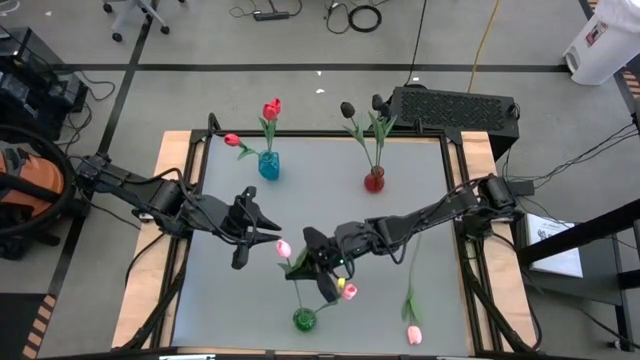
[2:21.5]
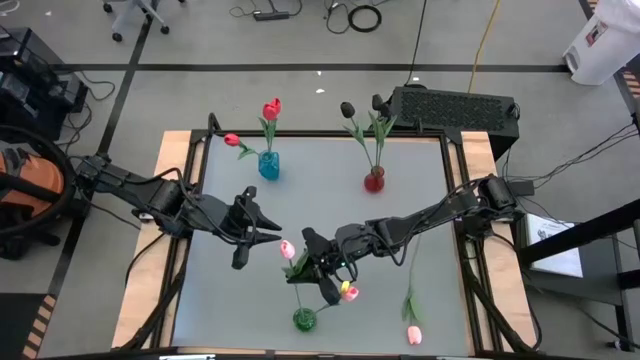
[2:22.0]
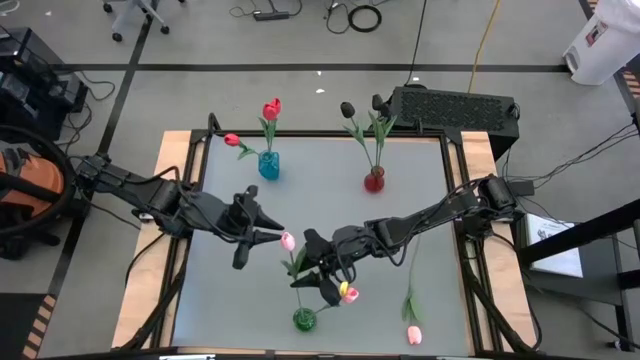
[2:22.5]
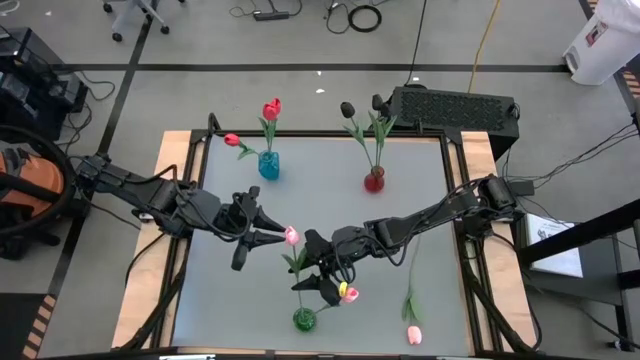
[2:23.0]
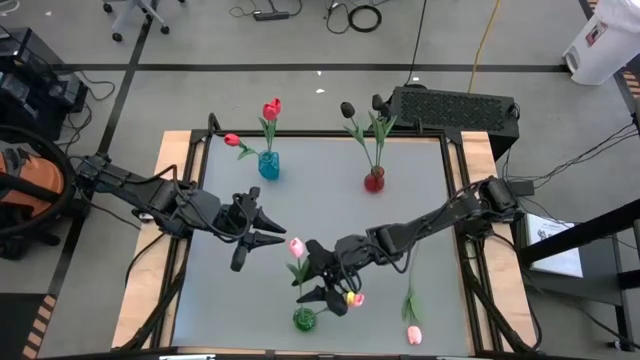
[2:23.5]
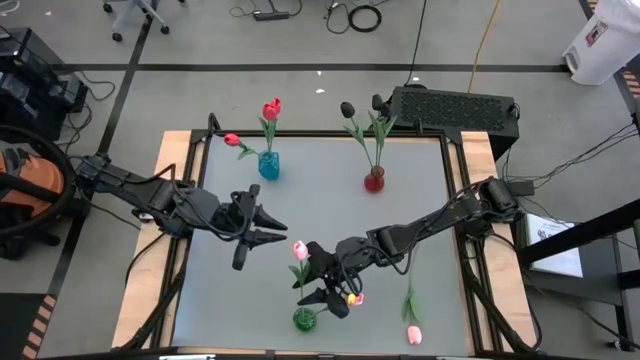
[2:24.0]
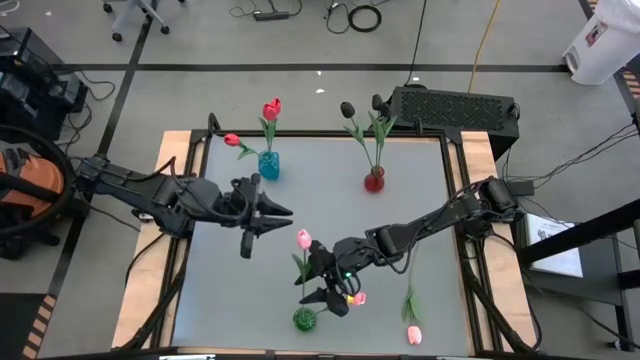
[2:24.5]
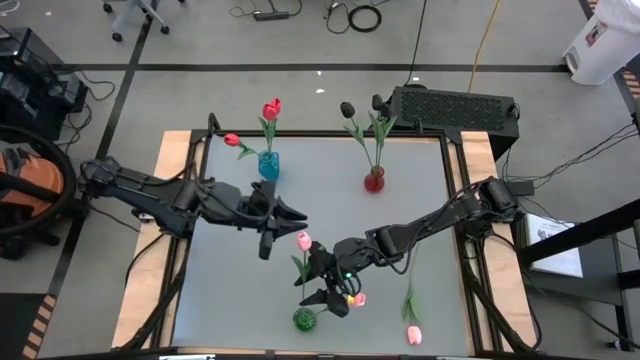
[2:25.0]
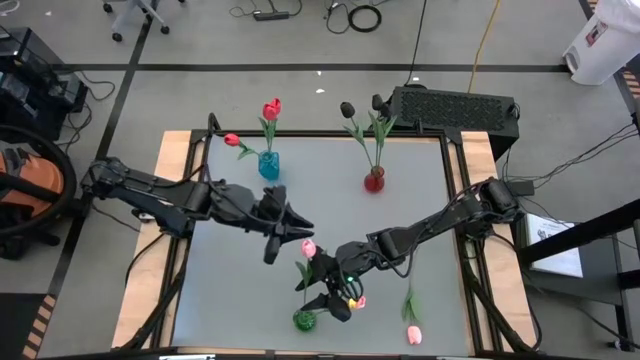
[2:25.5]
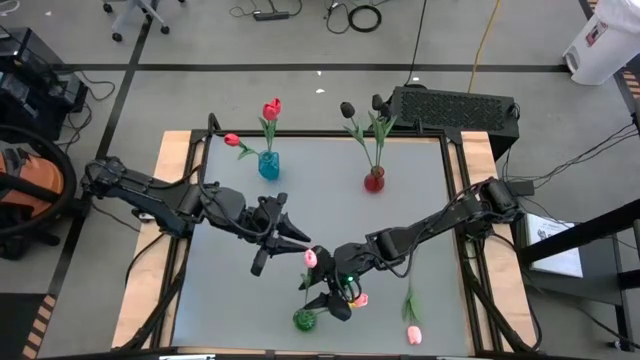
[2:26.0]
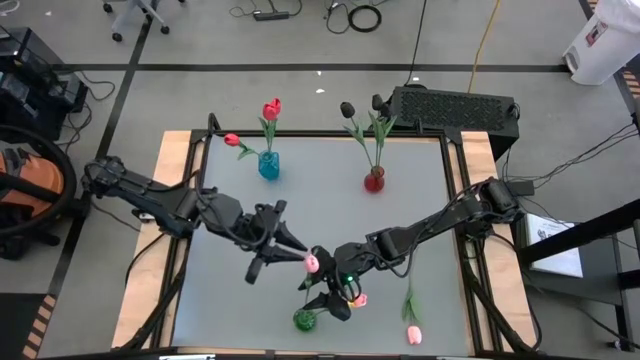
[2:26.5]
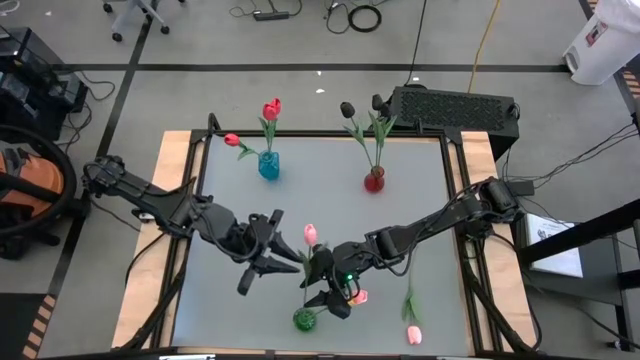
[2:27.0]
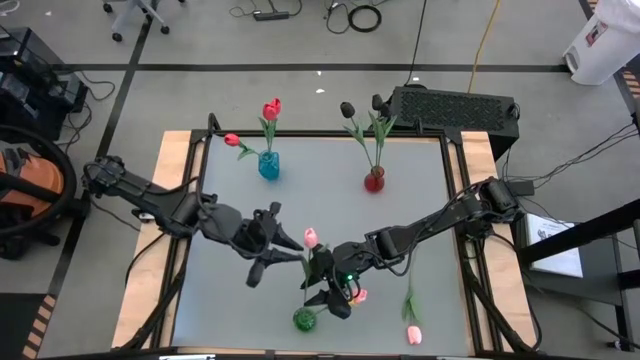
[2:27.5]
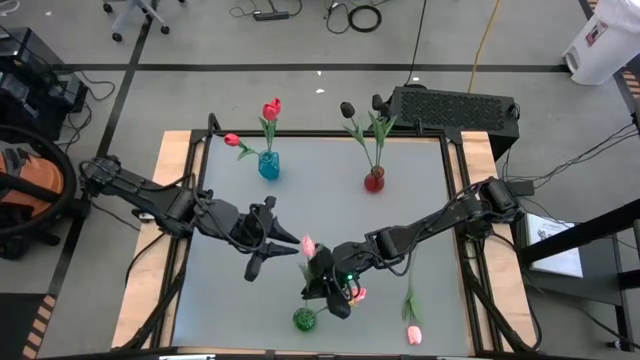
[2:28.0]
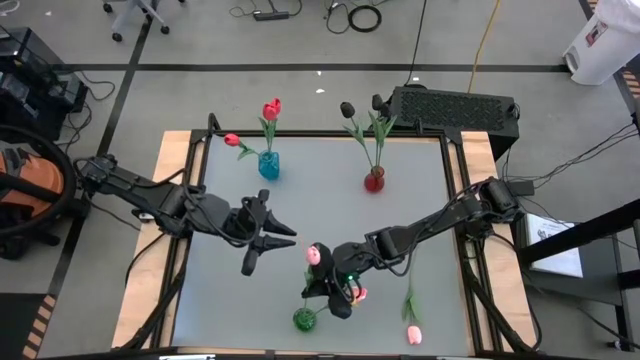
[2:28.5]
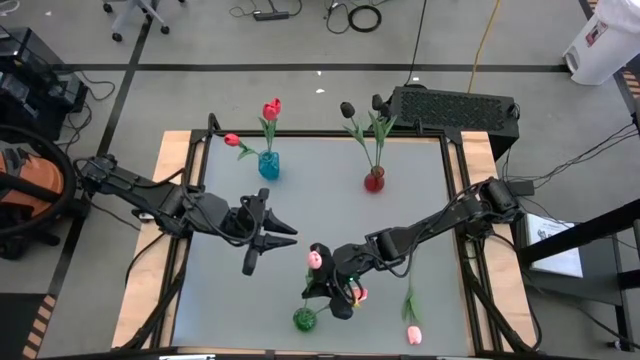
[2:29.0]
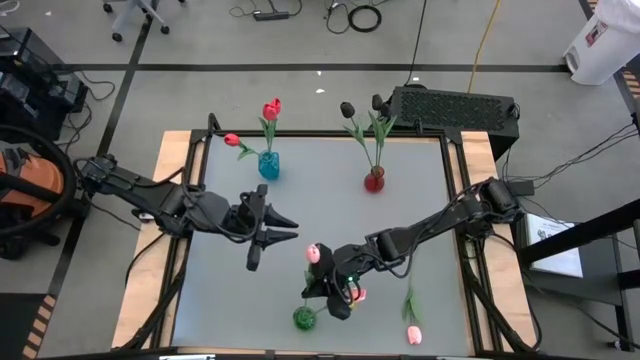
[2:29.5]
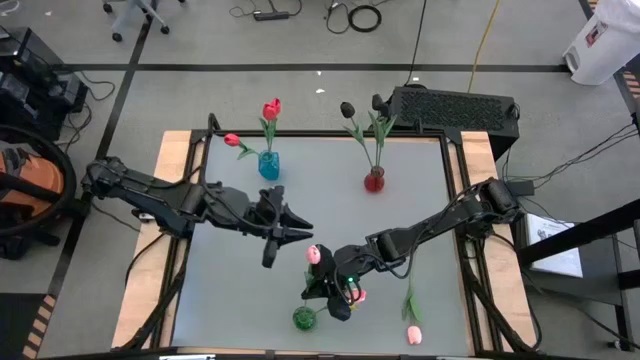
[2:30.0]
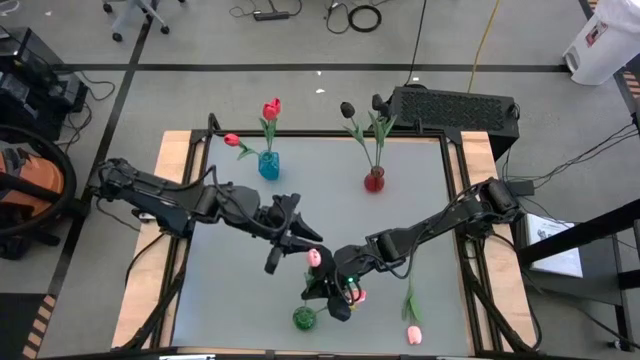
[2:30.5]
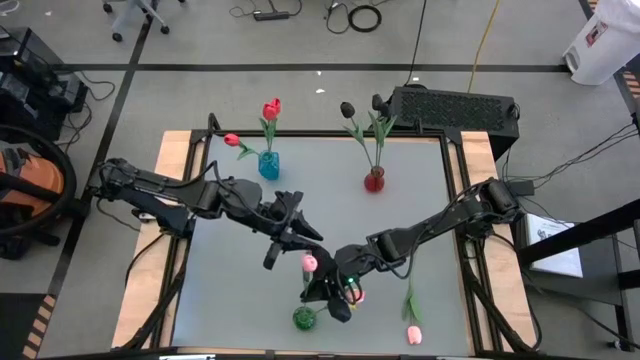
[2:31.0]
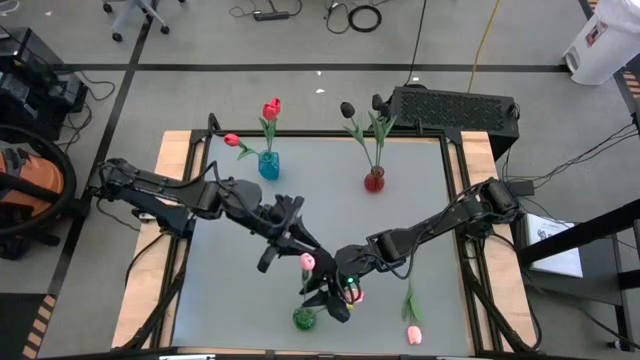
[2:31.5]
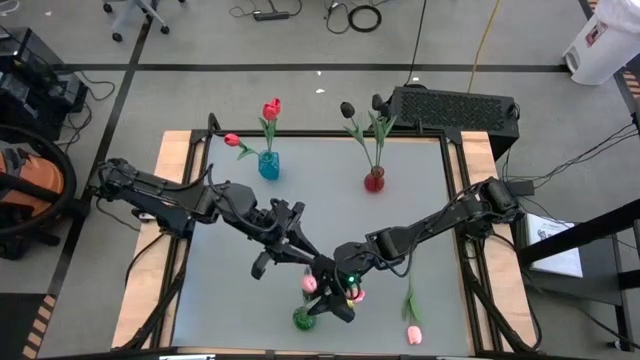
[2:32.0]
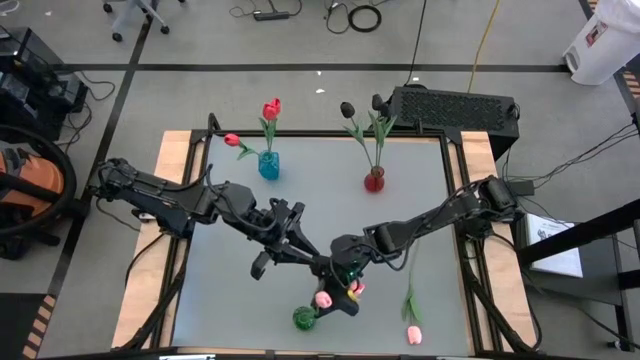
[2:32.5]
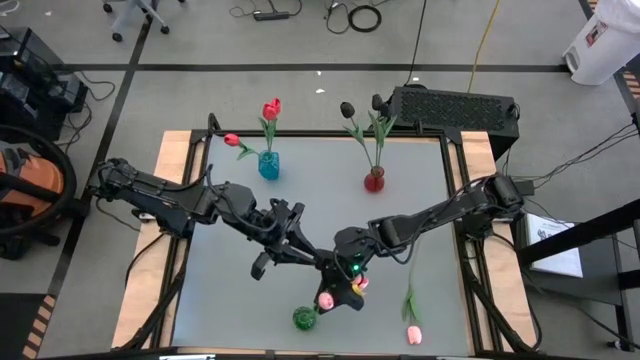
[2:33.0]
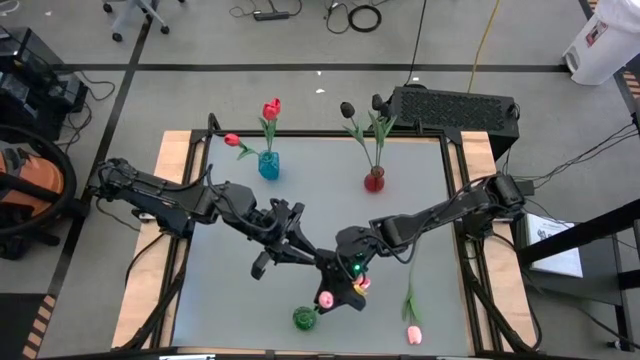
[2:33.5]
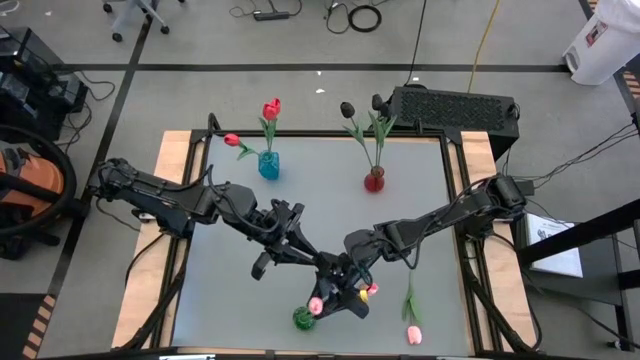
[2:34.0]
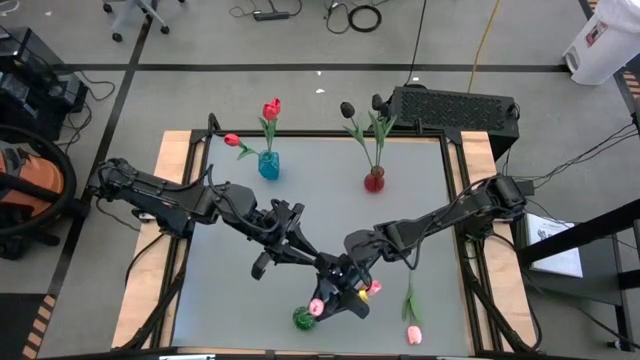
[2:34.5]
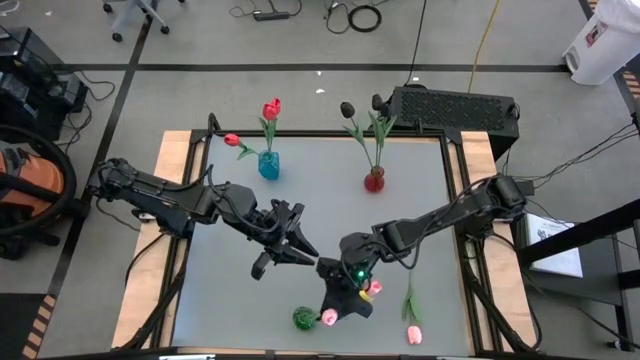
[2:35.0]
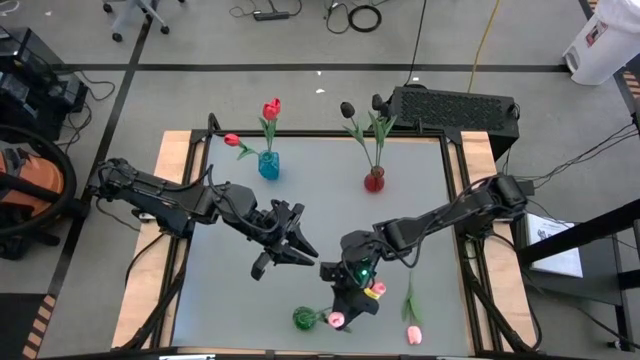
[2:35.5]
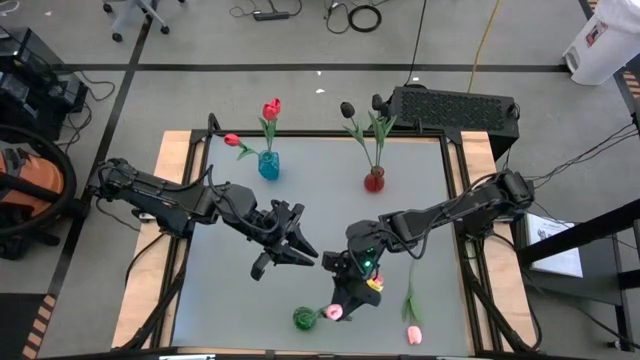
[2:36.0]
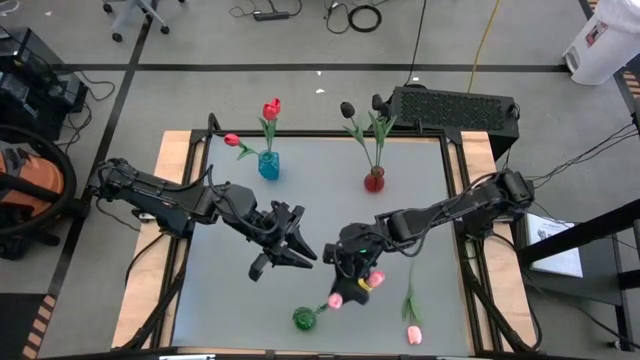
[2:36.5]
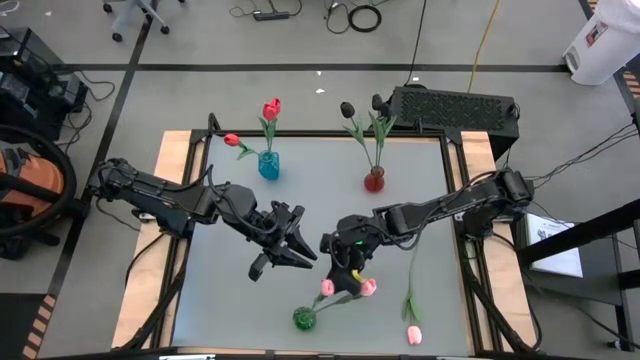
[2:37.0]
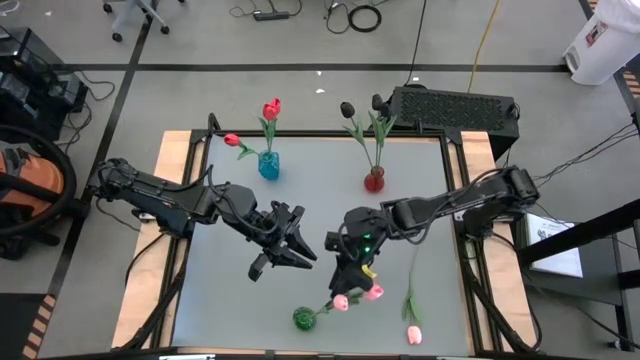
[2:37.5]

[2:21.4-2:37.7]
Task: Sort flowers into vase by color
Put the top pink tulip into the green vase

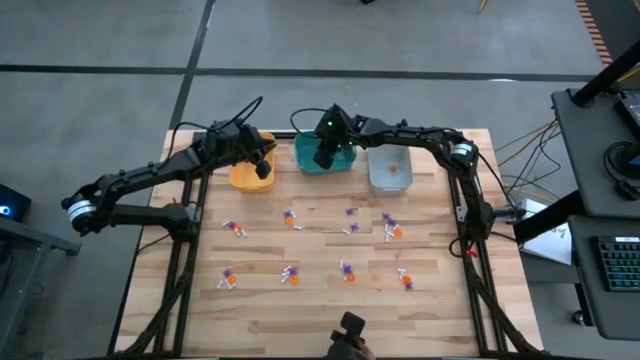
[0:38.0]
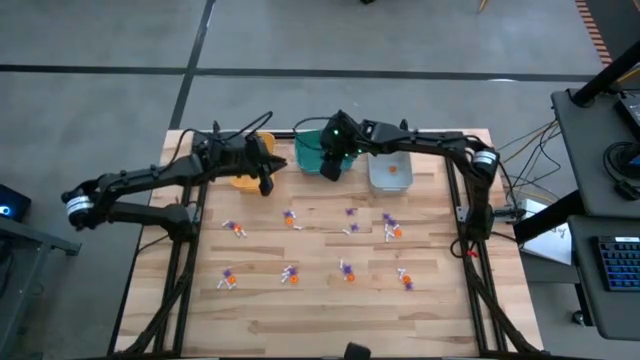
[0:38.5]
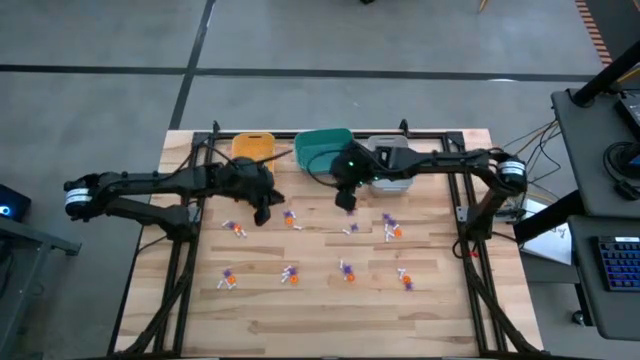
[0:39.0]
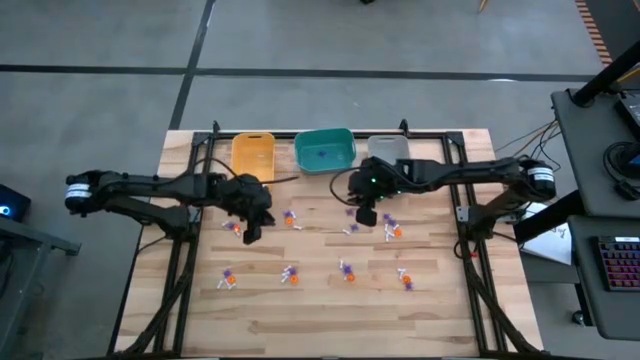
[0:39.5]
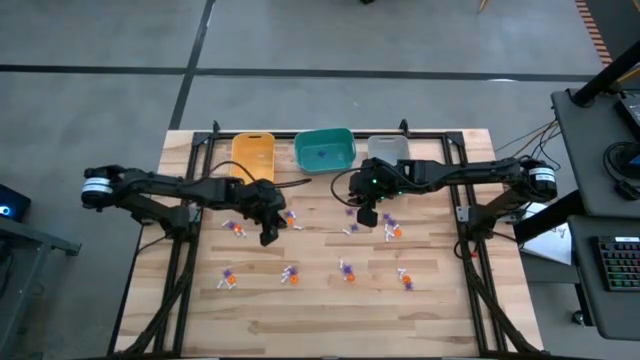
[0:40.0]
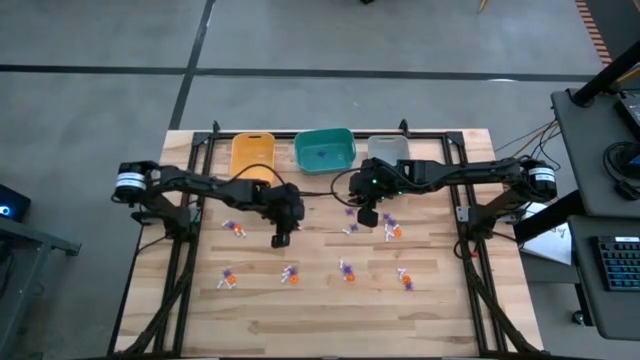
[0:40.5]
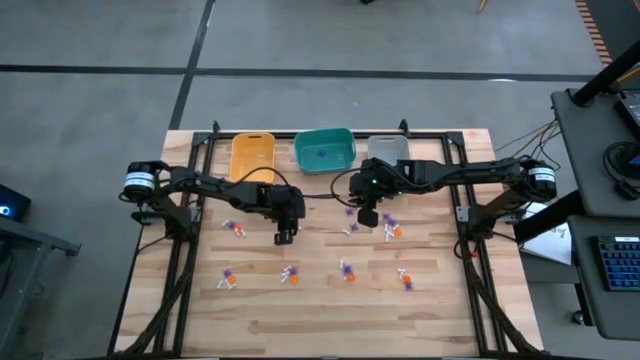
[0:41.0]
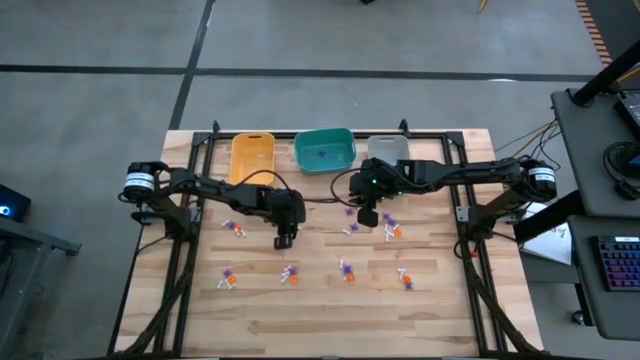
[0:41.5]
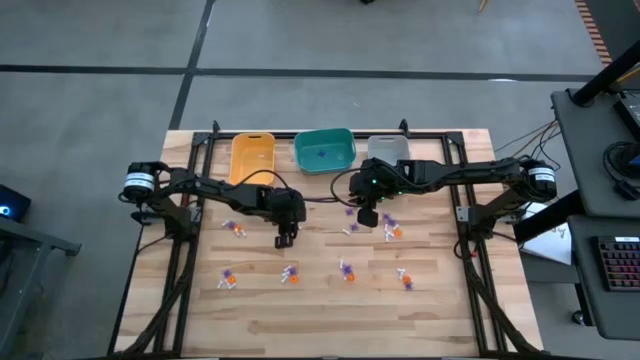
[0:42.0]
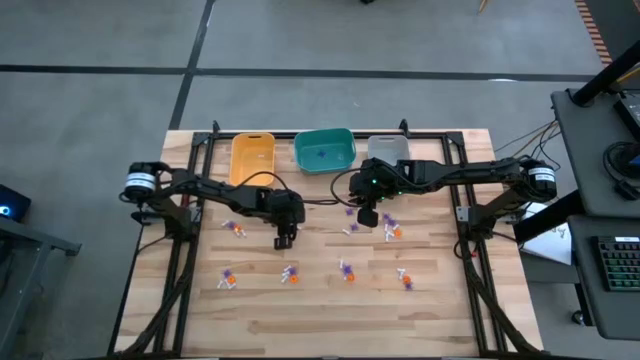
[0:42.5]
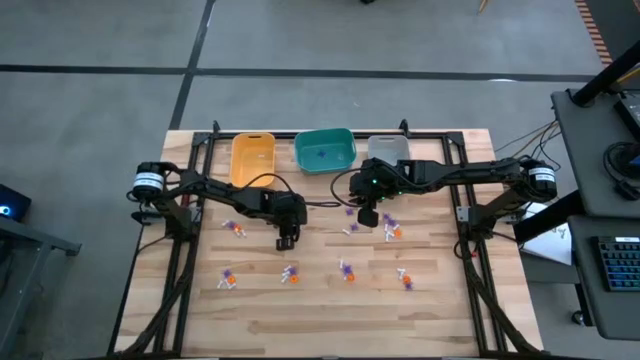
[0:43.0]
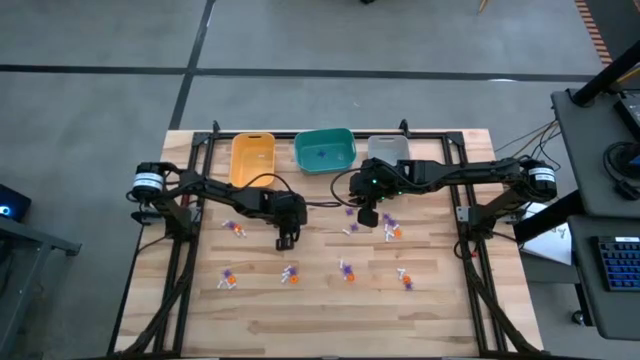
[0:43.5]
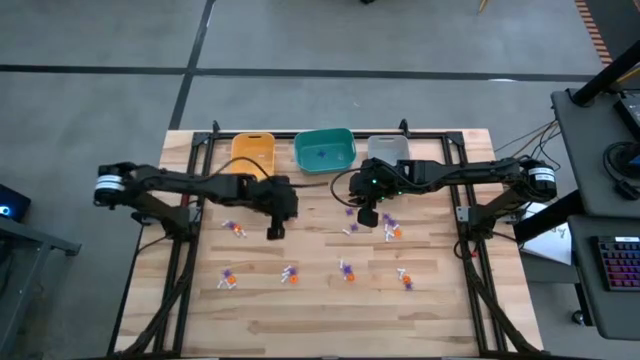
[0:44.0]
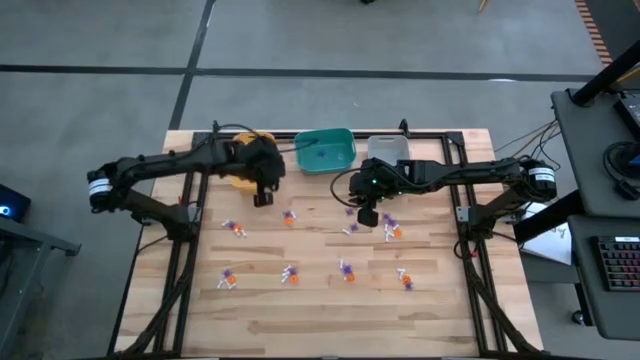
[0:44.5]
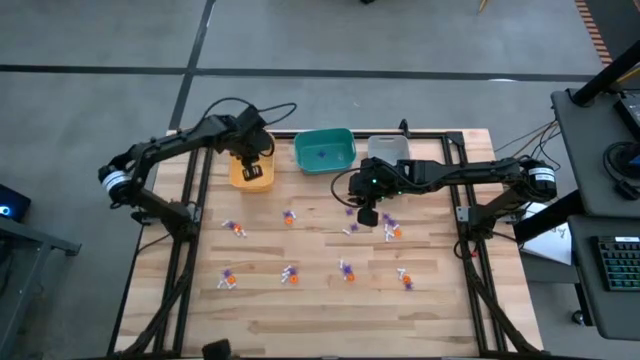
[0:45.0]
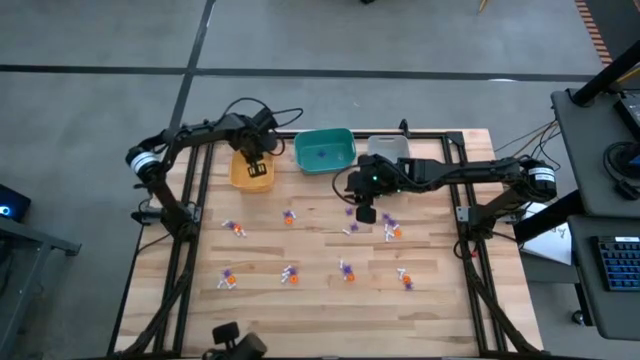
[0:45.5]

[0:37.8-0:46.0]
Task: Sort Halloween decoration
Put the white bone toy into the yellow bin
